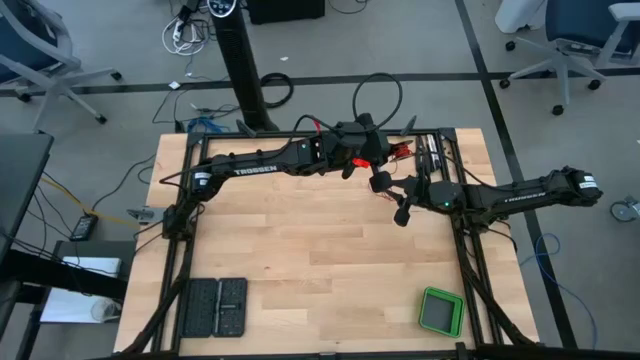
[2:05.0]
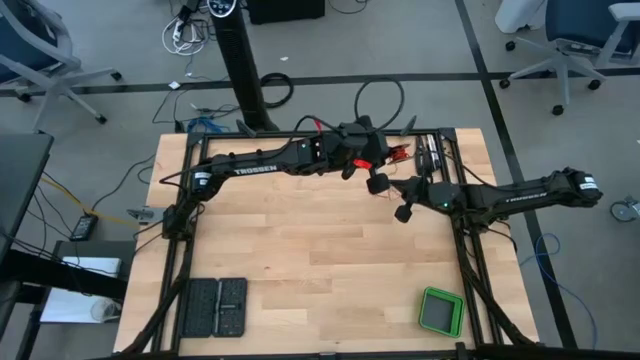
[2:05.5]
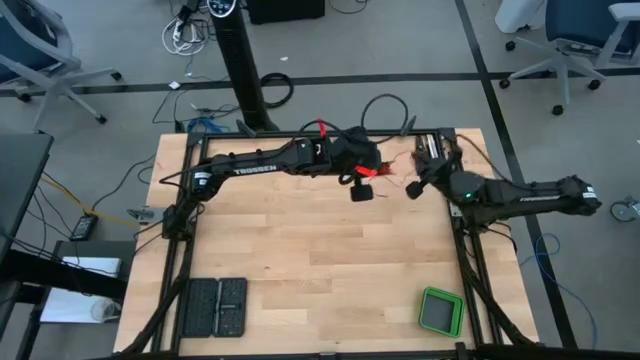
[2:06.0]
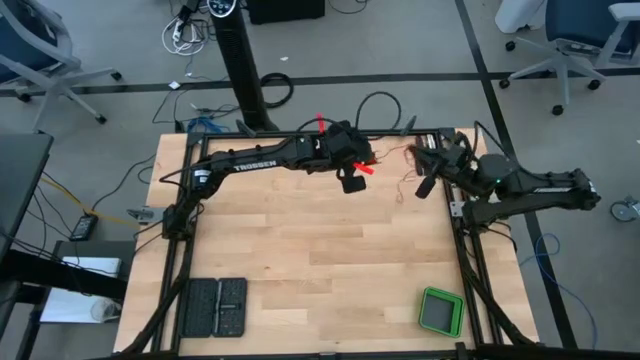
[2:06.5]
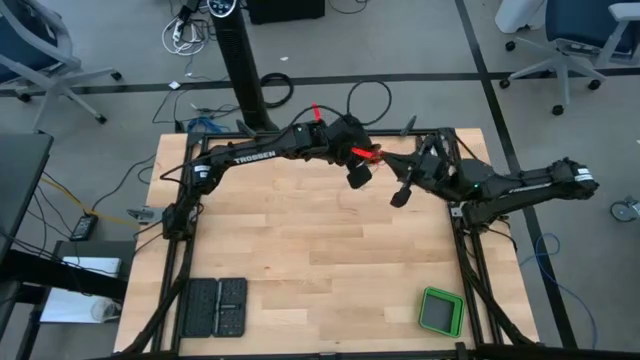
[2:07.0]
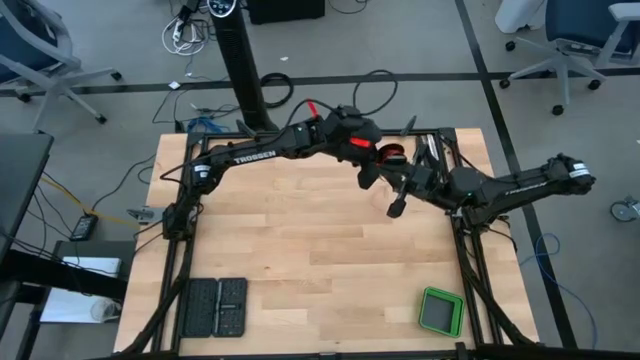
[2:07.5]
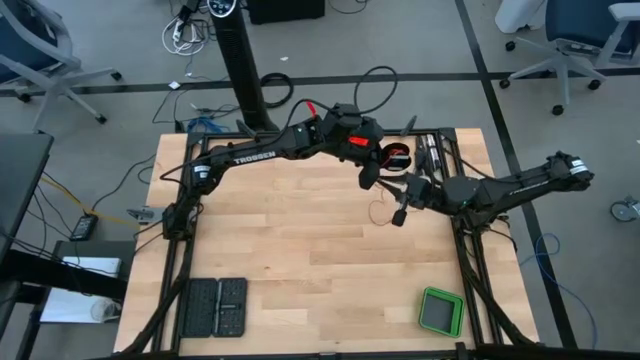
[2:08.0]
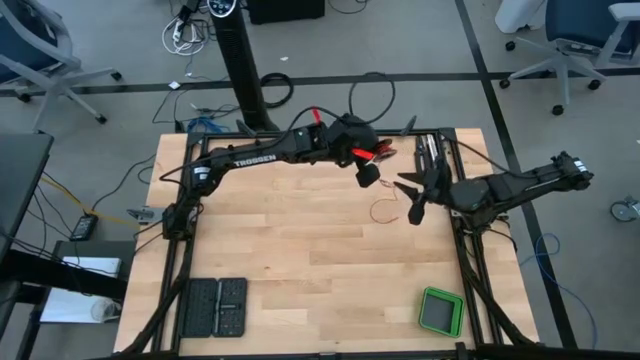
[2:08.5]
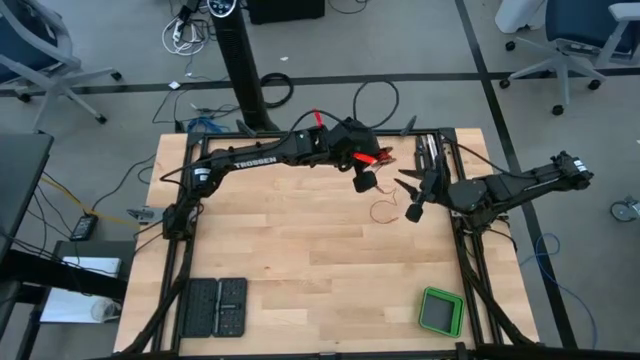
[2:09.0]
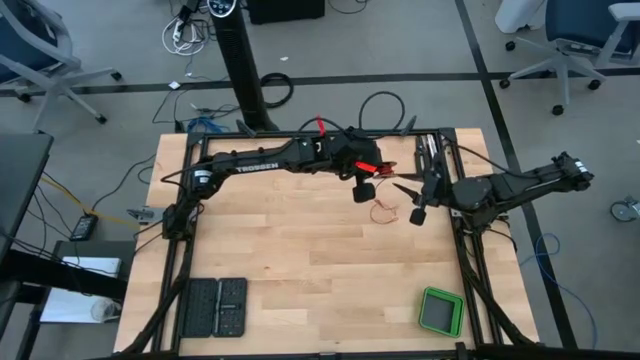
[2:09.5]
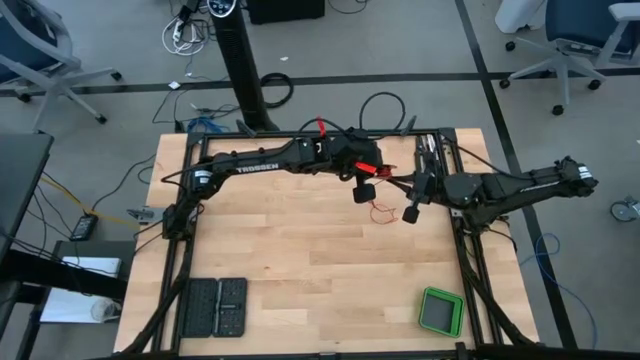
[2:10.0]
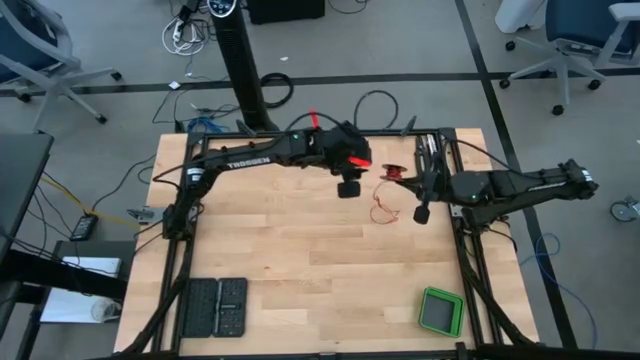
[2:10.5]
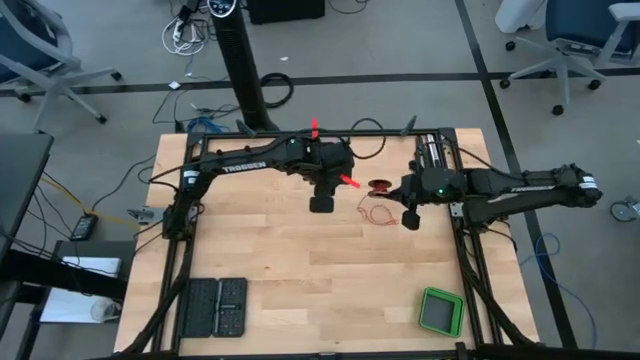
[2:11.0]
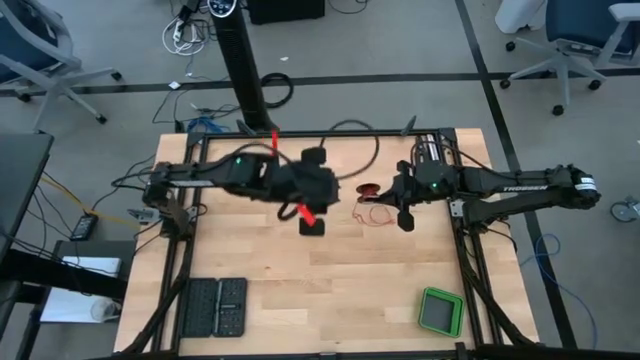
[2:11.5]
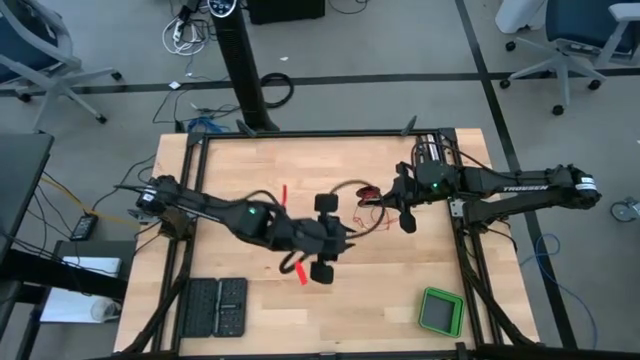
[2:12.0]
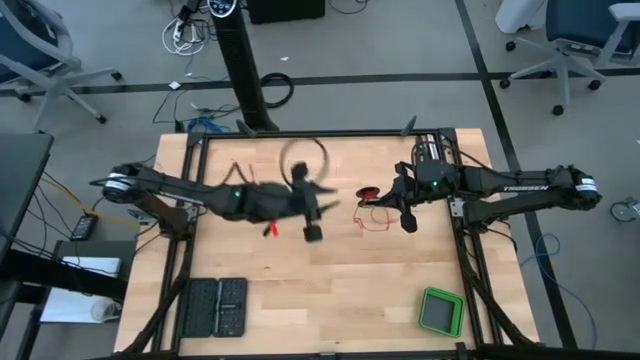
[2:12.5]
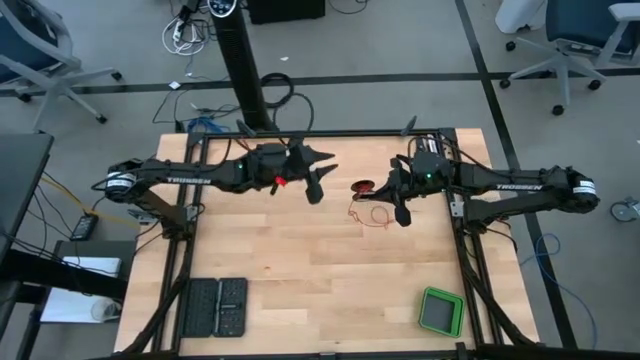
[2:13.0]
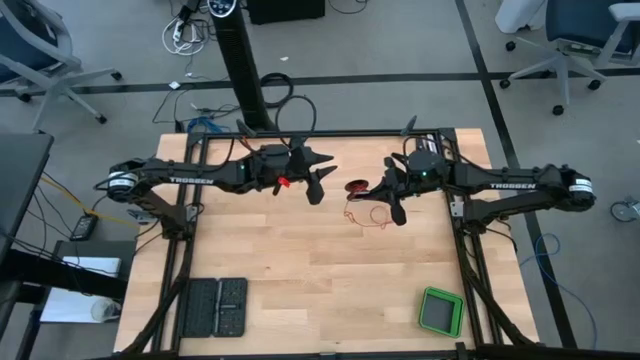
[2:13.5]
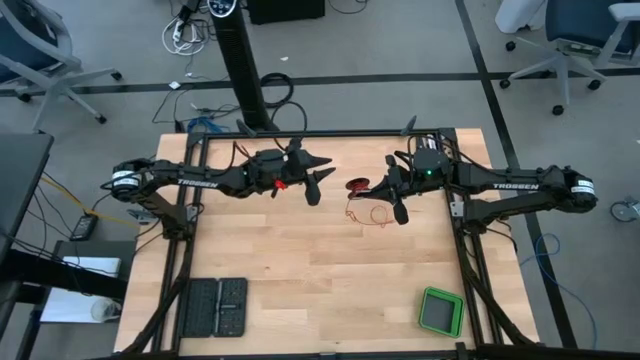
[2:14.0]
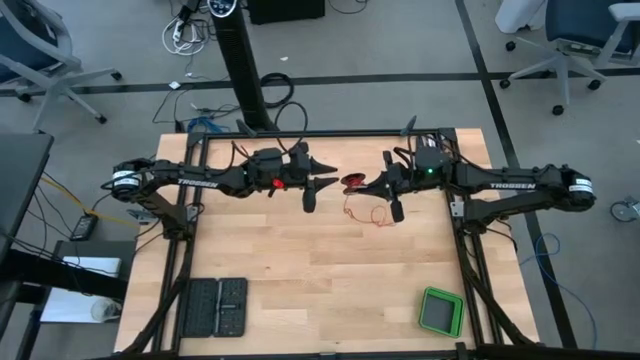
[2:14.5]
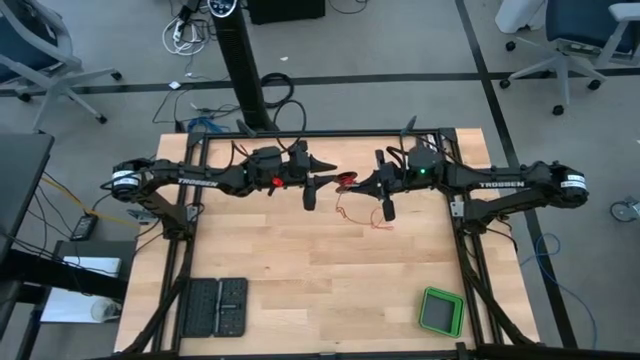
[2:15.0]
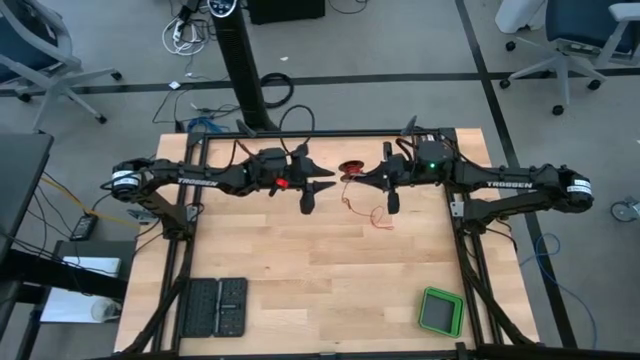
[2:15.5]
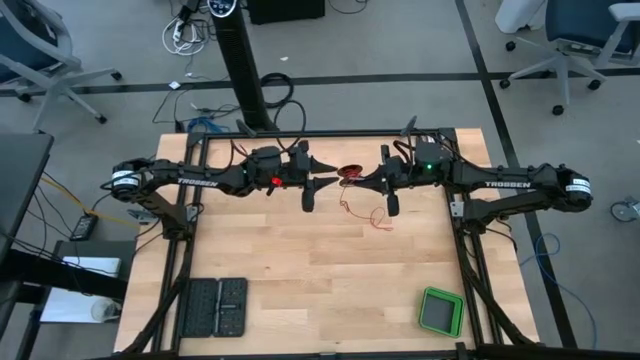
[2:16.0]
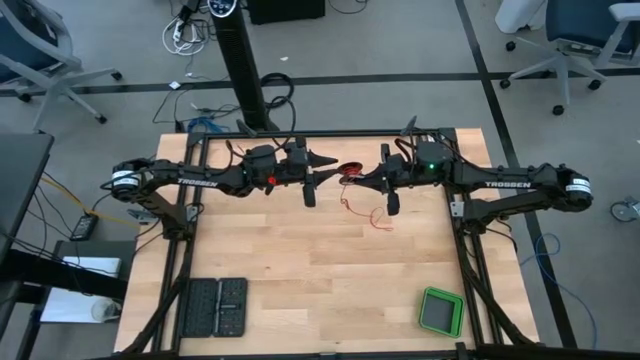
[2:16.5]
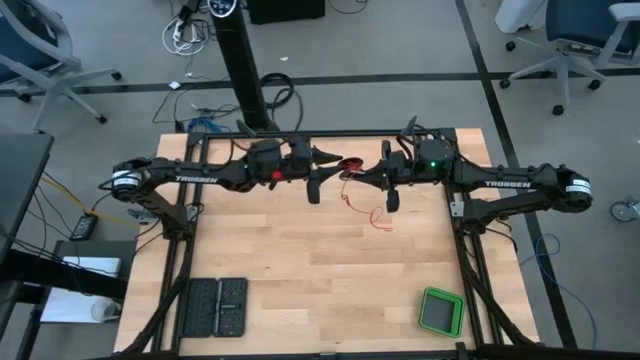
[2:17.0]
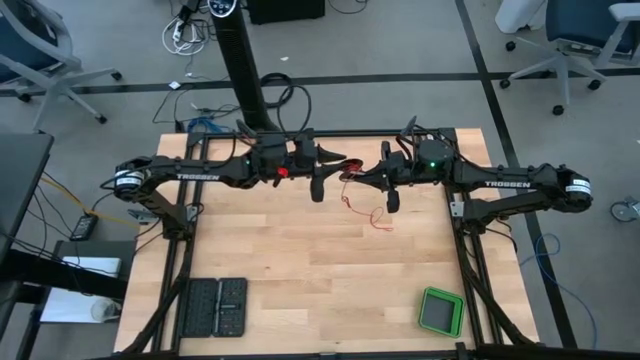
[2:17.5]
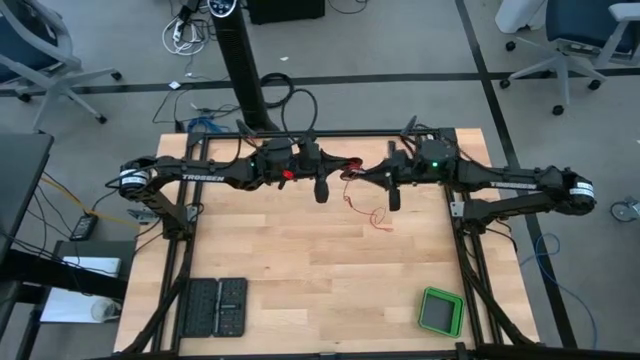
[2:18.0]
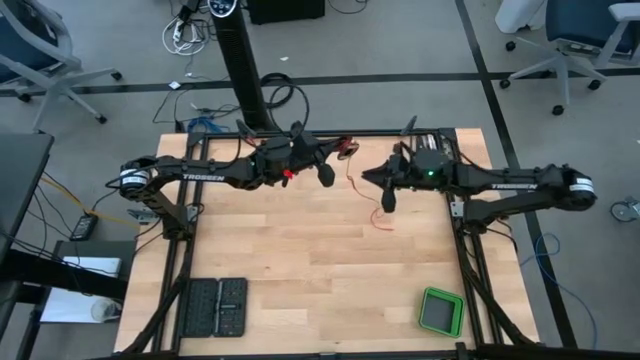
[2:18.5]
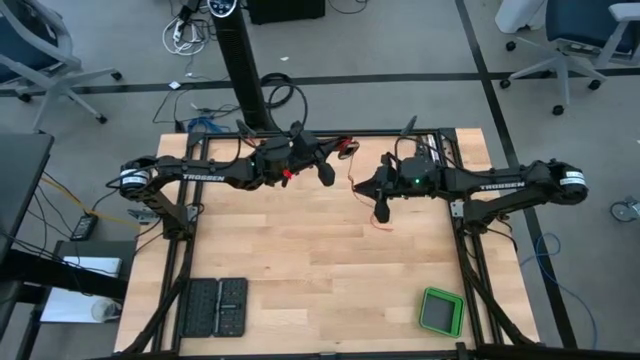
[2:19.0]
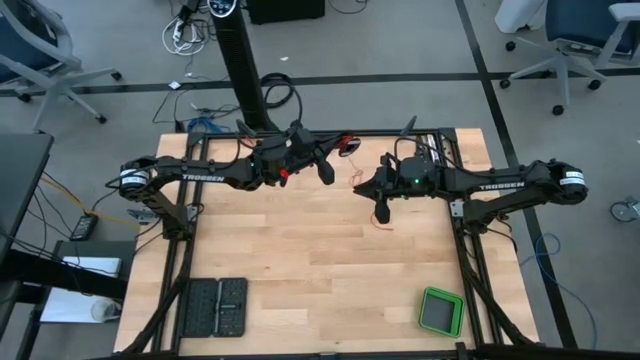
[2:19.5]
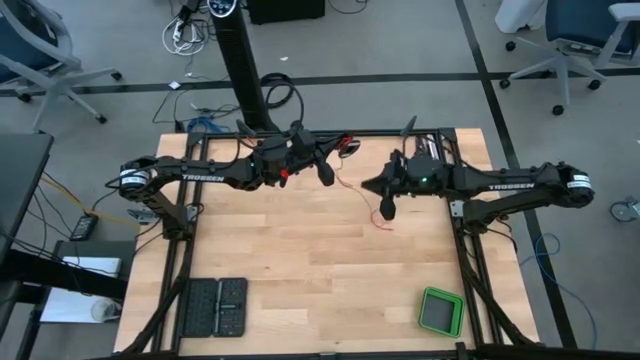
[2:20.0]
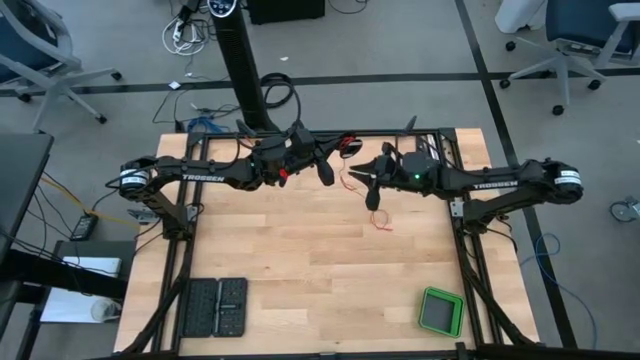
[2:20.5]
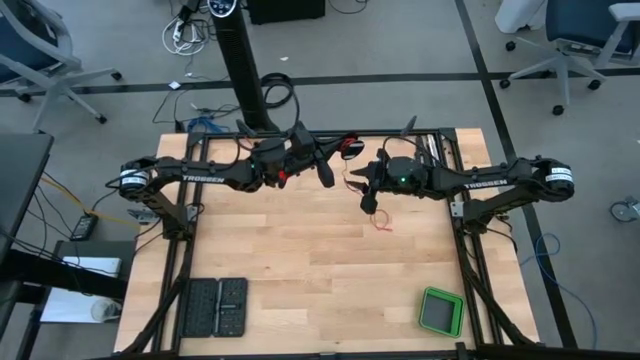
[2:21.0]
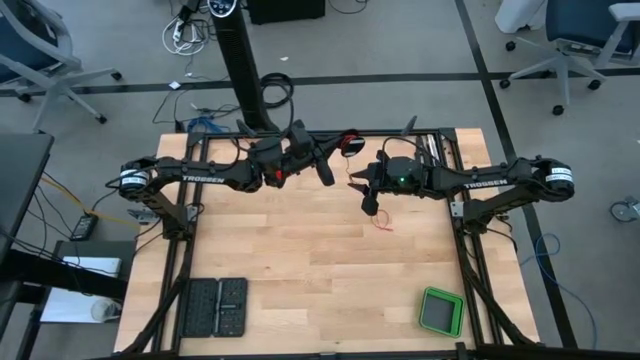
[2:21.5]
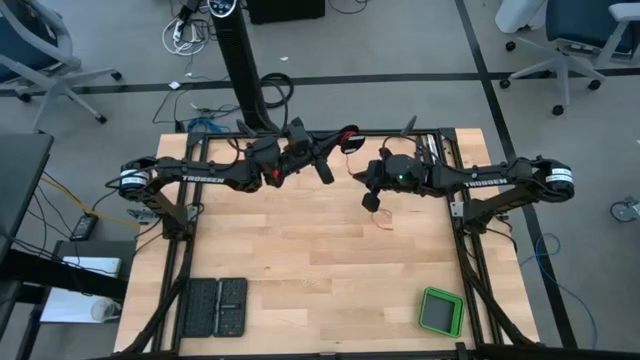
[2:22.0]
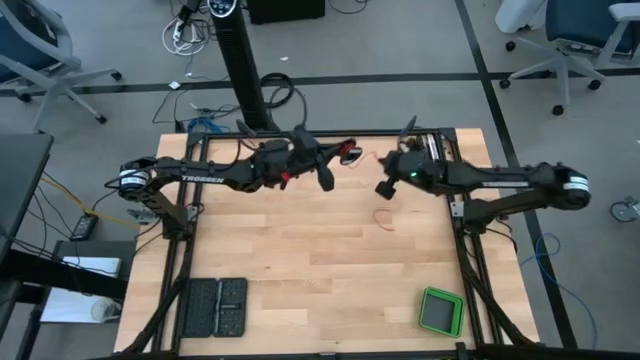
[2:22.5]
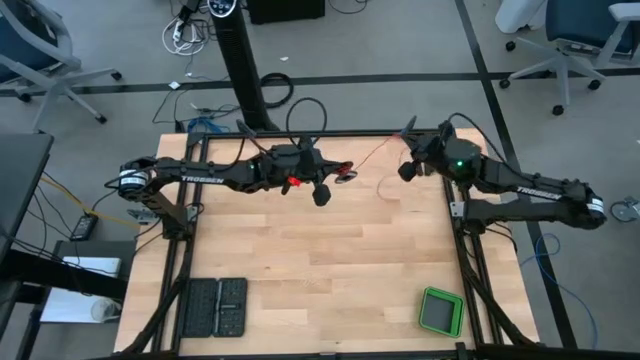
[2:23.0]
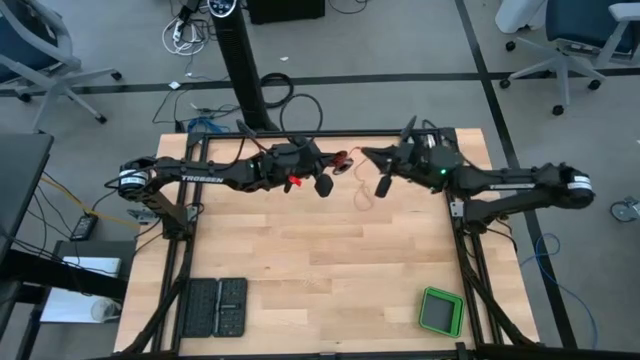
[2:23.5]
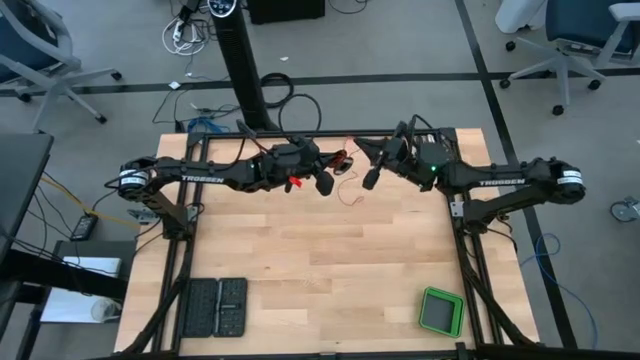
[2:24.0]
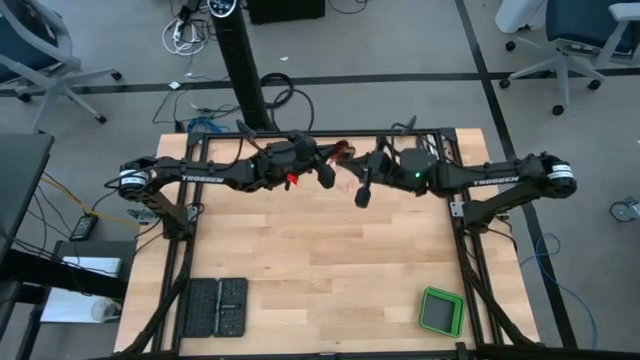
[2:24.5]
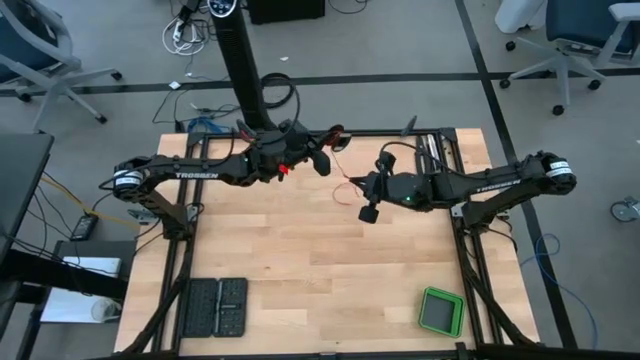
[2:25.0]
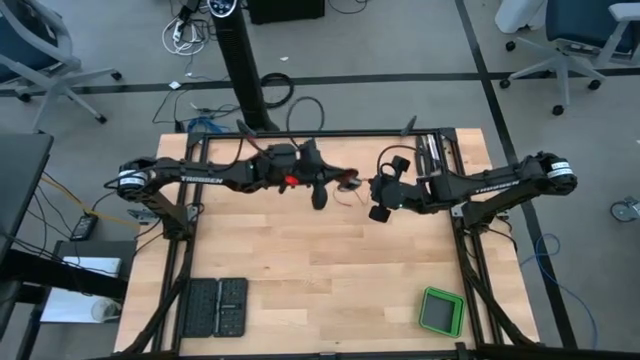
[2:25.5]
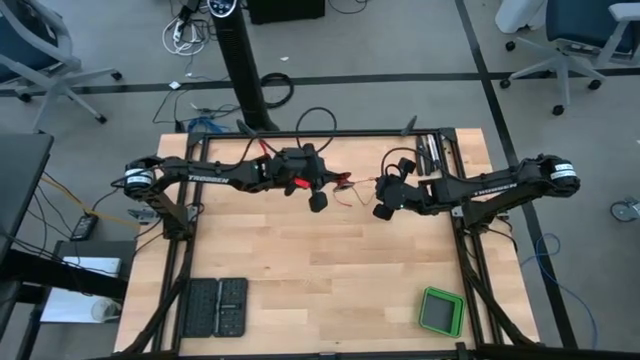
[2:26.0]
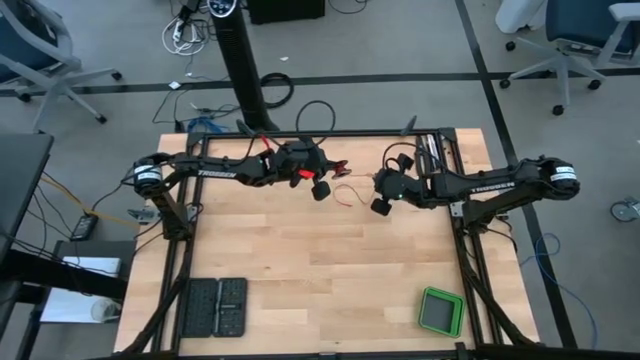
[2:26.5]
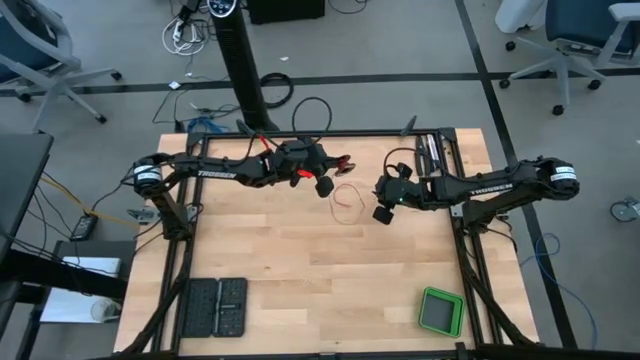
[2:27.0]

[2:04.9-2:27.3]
Task: Coil cords
Coil the red wire cable onto the black spool
